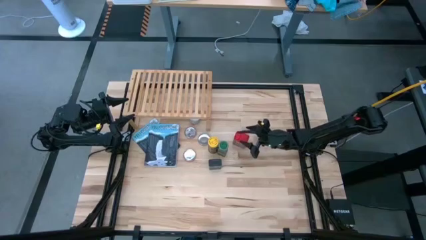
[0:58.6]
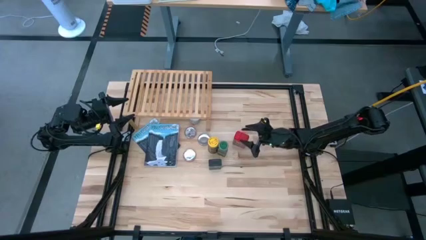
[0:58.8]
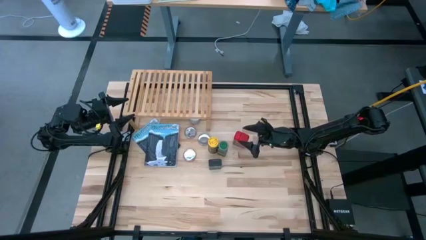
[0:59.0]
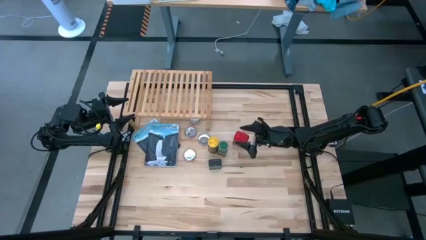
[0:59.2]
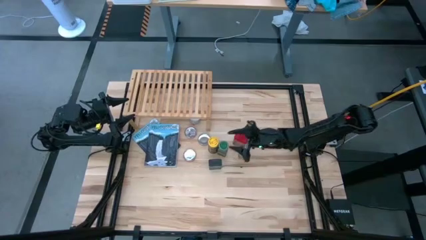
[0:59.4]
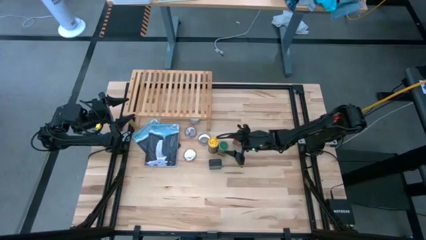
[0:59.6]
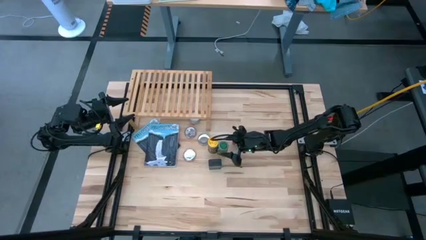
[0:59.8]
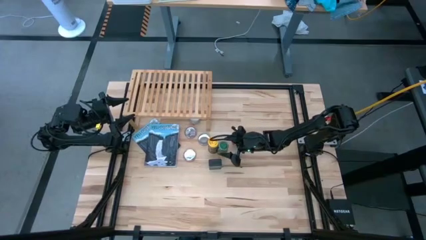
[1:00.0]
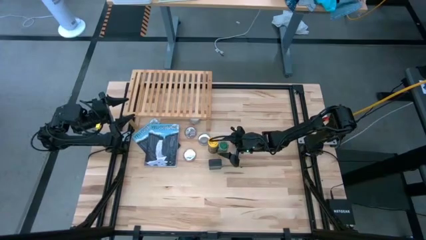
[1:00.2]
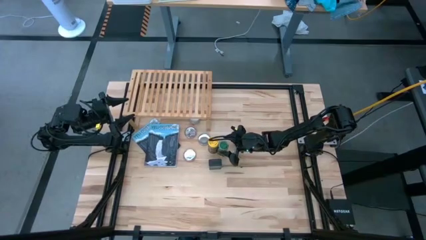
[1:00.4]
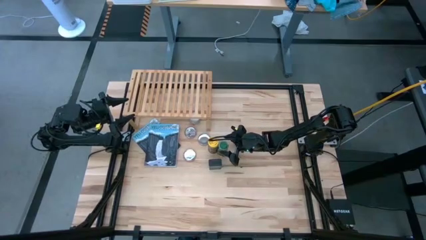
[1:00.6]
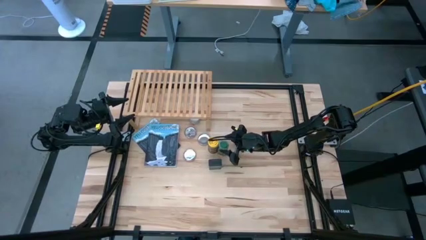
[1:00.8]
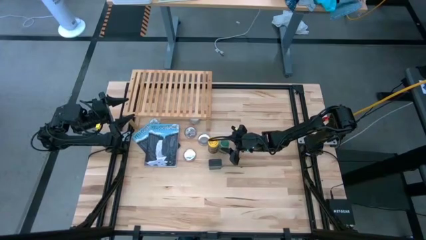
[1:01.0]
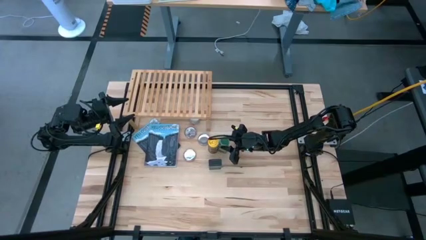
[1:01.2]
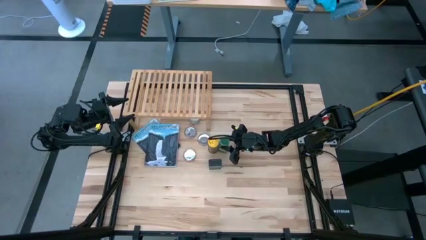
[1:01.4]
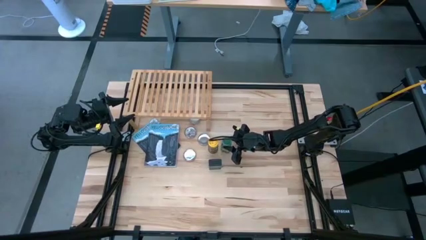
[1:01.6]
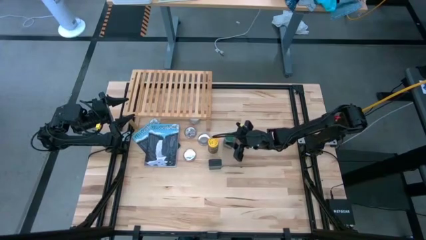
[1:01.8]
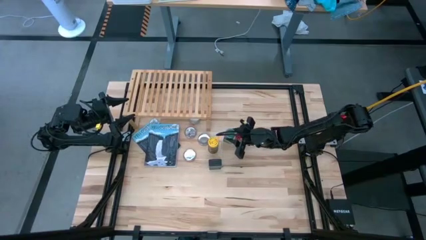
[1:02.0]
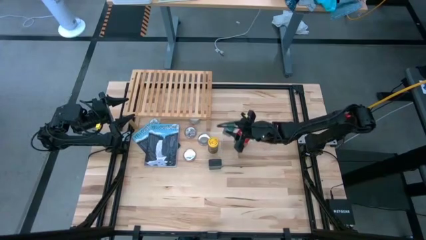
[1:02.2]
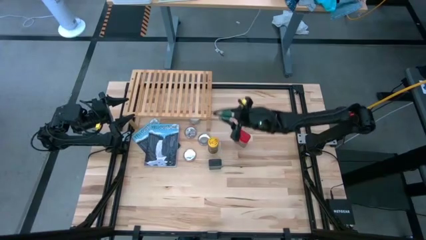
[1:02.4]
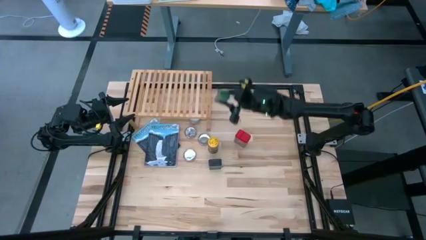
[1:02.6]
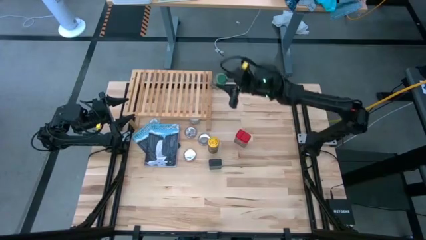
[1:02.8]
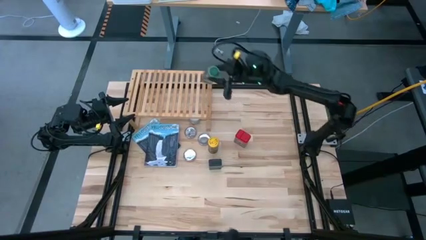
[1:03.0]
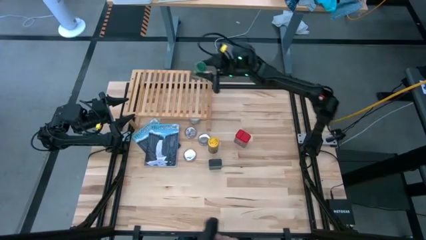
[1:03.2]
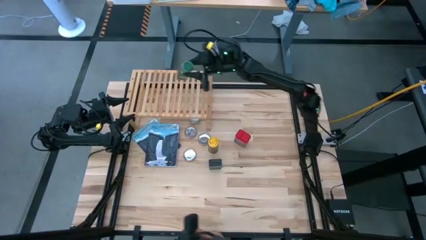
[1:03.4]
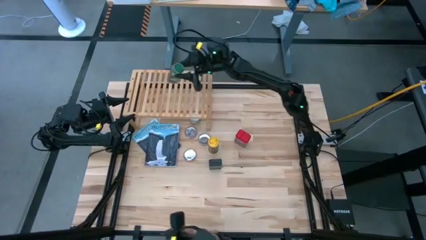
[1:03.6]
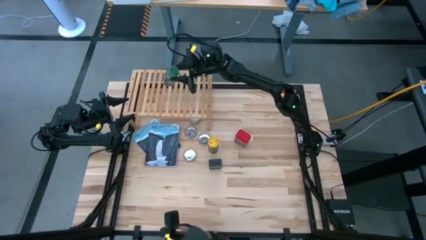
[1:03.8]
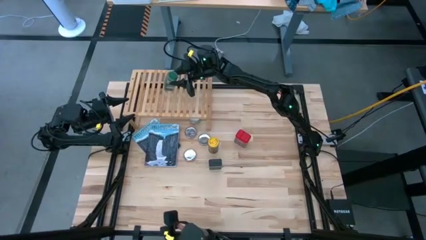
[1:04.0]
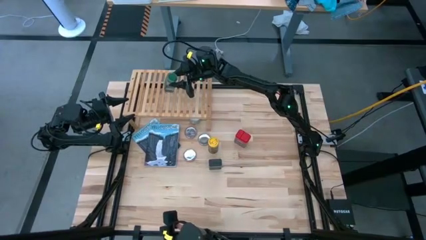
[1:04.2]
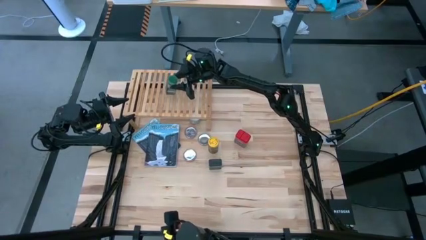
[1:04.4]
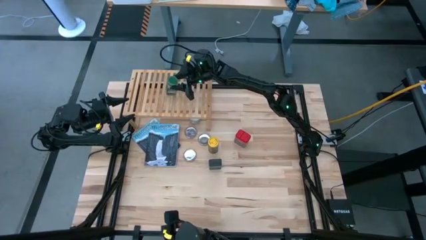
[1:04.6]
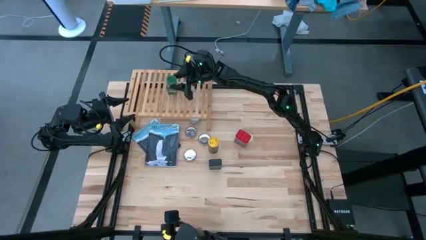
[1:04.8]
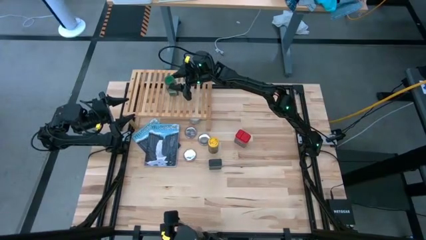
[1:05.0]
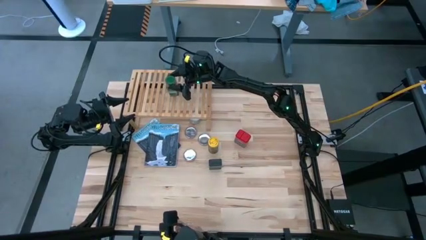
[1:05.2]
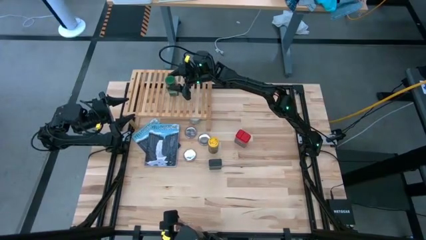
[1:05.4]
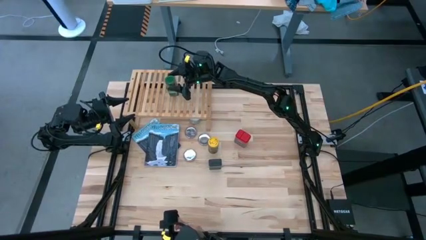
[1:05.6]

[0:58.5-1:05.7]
Task: Shelf spices
Put the green seasoning bottle on the shelf

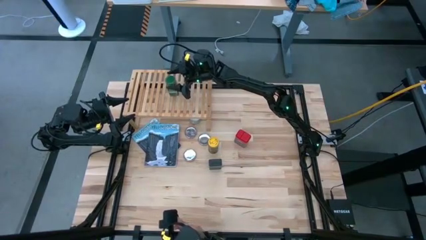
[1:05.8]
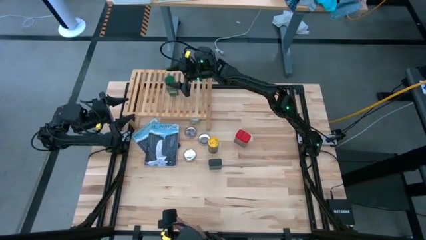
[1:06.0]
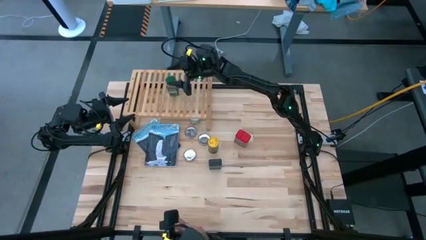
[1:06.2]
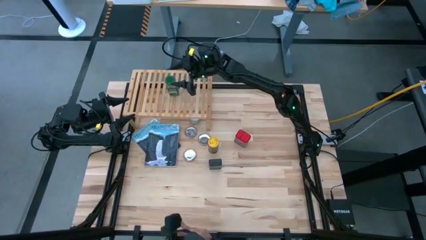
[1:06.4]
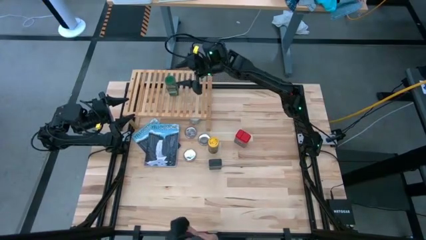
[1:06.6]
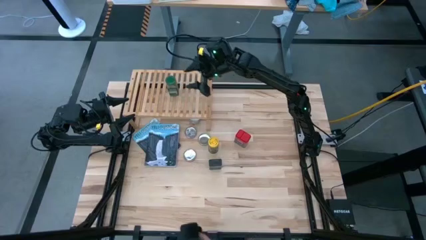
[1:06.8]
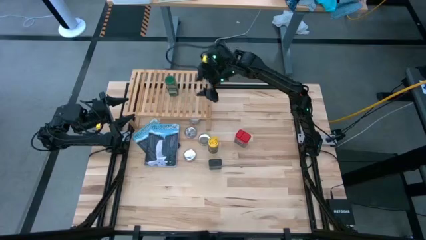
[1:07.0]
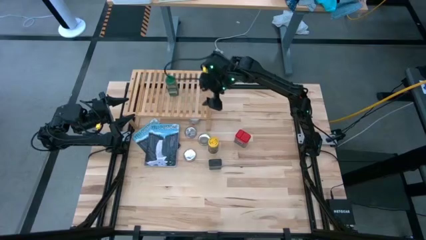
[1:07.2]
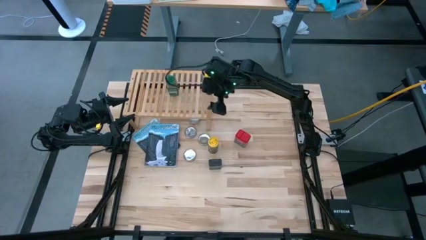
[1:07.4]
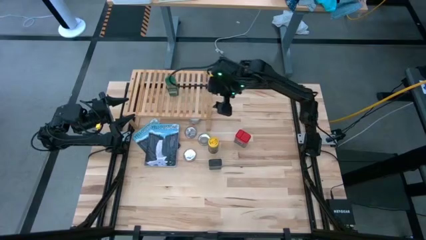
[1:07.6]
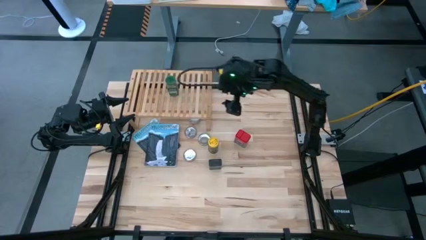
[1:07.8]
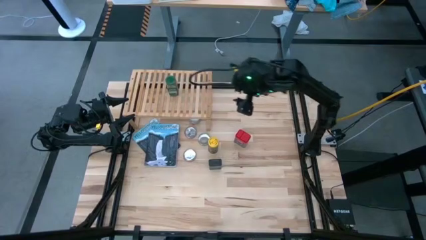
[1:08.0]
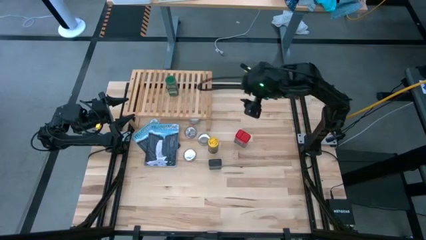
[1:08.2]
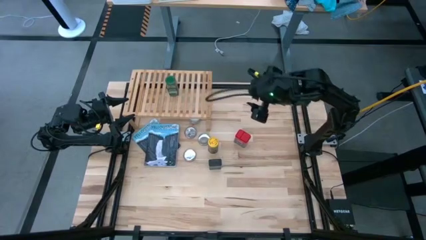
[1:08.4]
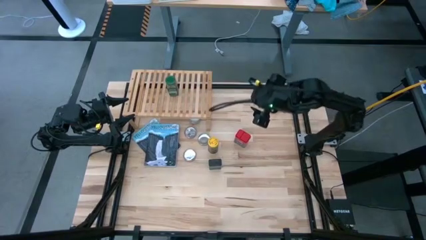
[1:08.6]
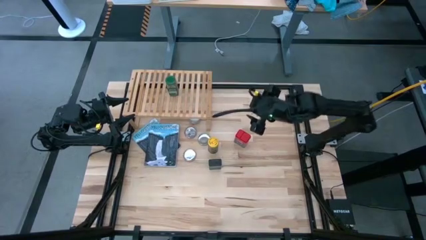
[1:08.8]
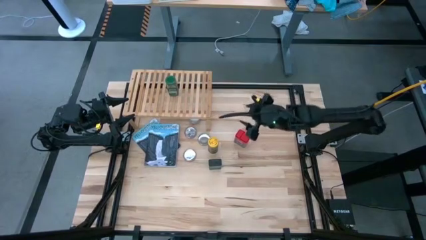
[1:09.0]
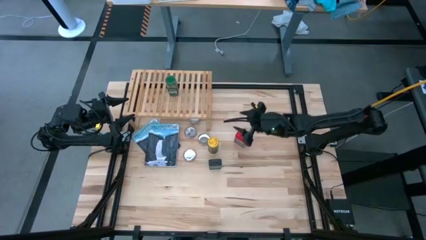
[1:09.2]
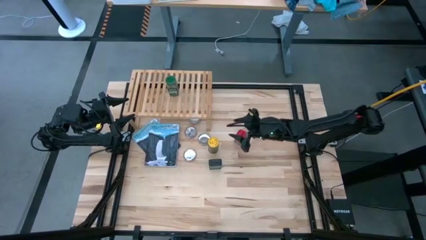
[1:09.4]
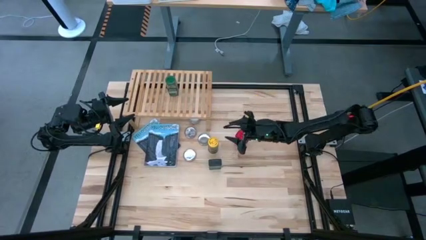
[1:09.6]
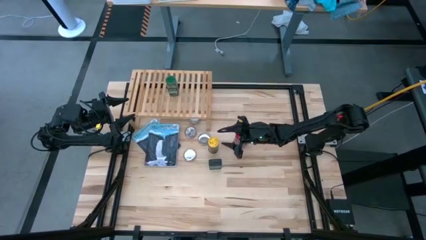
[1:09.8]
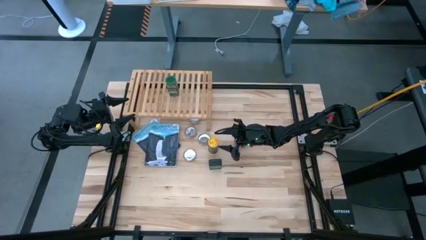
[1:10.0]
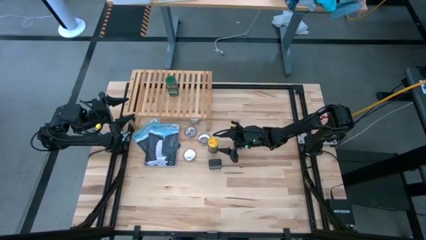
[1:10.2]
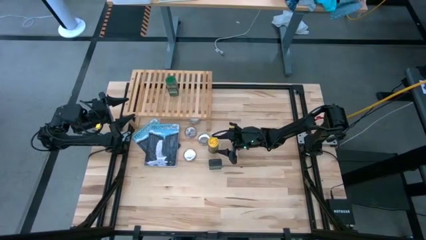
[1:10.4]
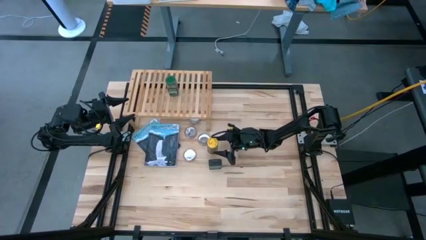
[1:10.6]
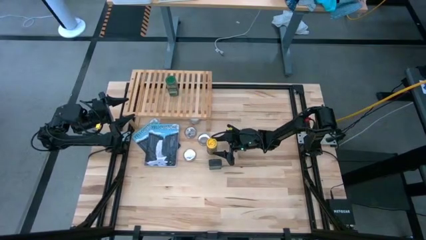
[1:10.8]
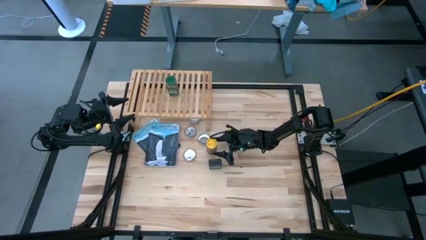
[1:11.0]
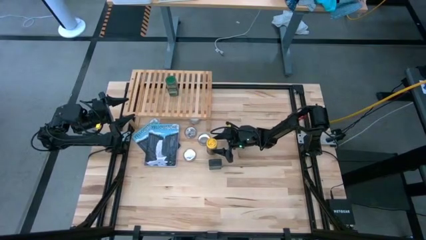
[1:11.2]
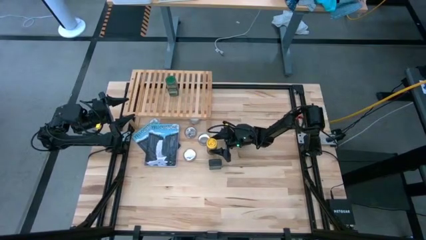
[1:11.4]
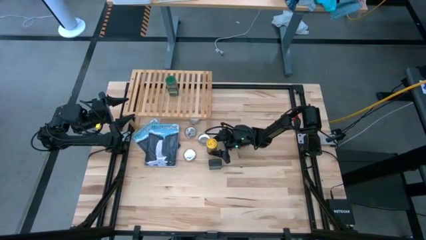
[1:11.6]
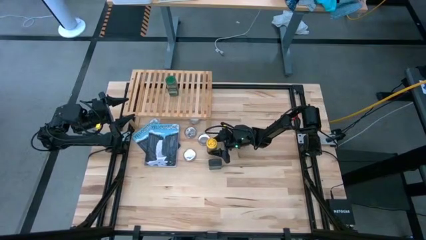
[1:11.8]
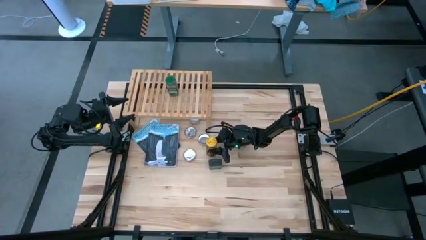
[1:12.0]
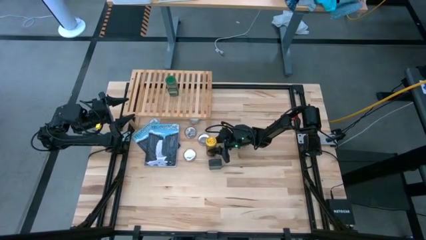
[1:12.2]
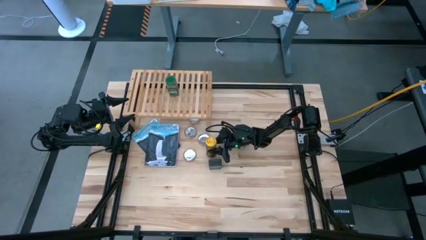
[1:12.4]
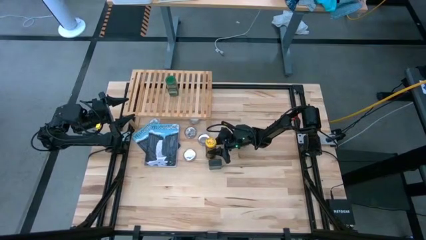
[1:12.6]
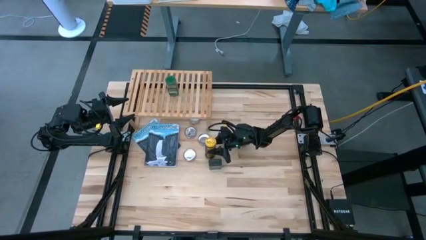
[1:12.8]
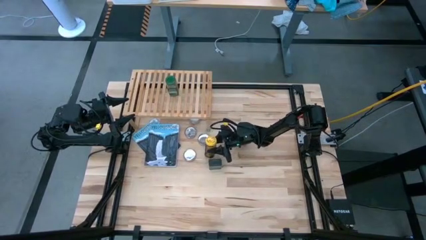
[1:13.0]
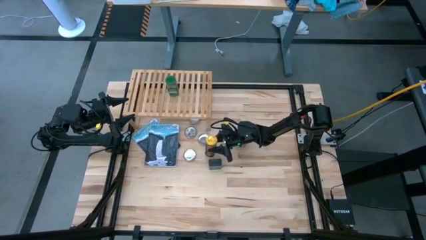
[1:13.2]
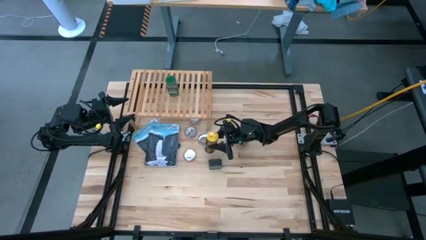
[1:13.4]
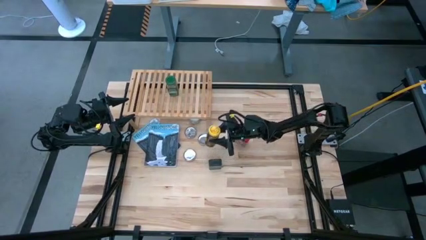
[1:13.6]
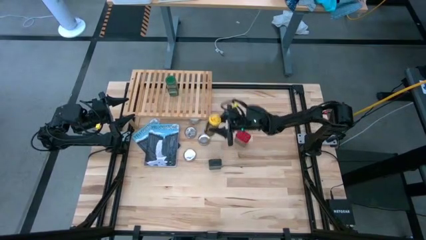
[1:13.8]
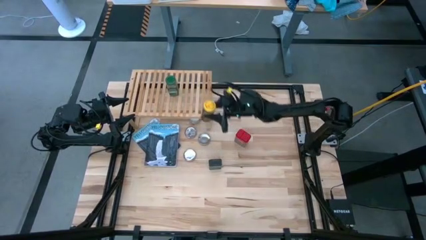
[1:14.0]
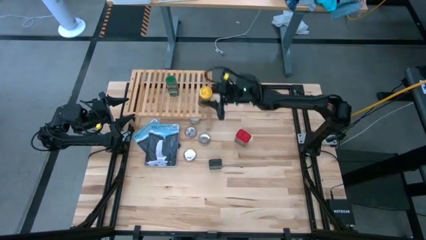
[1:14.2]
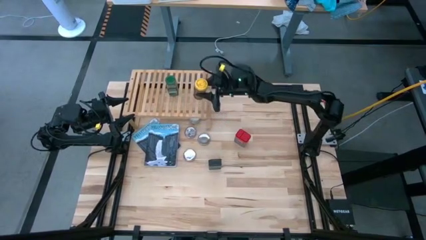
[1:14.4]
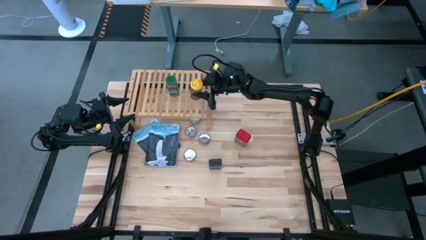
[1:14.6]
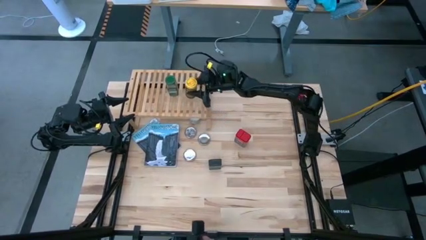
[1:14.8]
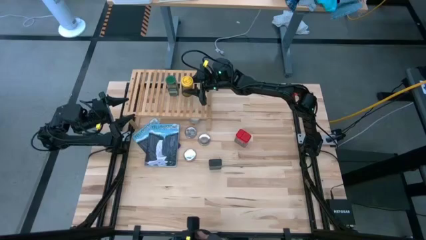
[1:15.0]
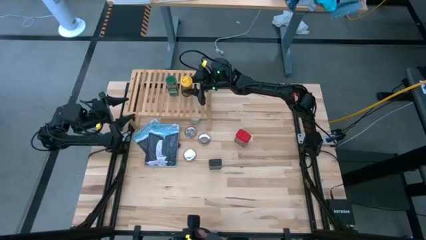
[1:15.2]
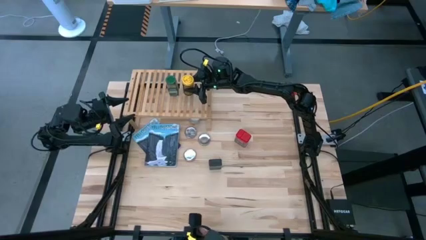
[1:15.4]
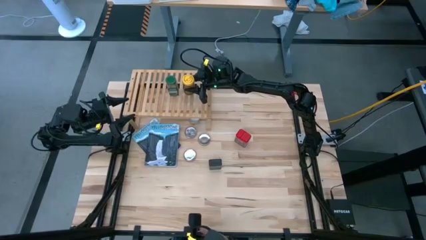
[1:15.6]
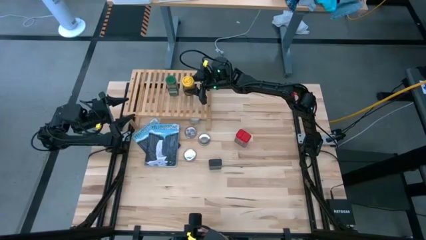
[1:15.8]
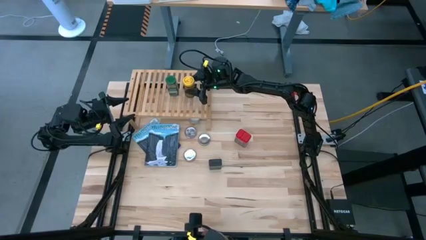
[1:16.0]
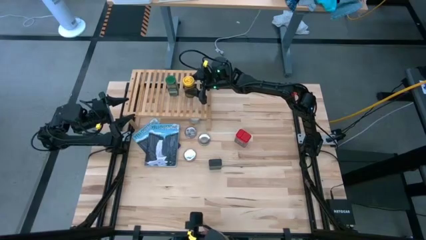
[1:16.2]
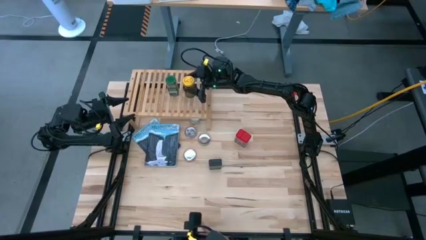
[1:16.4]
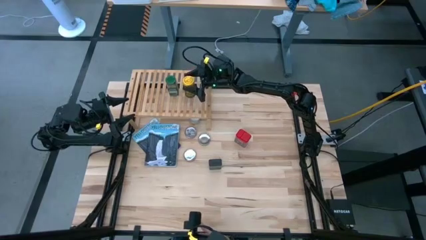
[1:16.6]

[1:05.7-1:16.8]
Put the yellow seasoning bottle on the shelf
